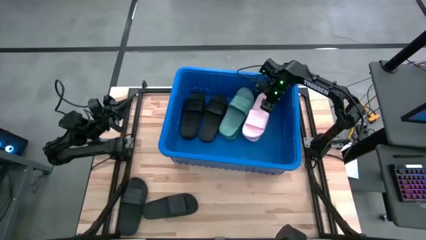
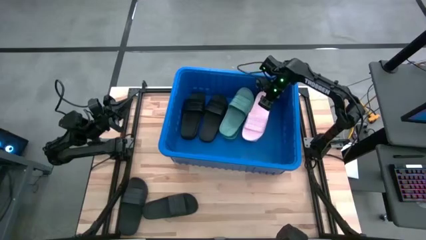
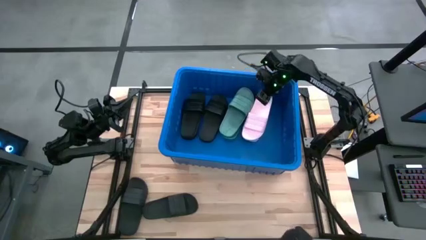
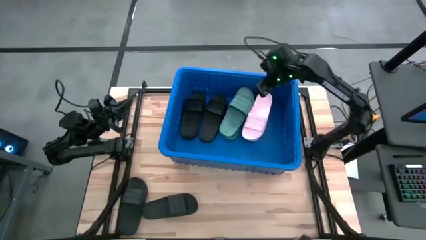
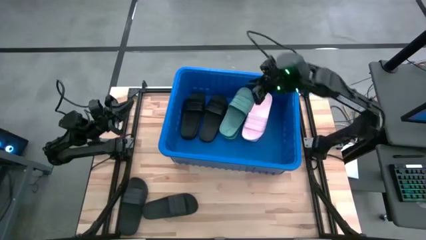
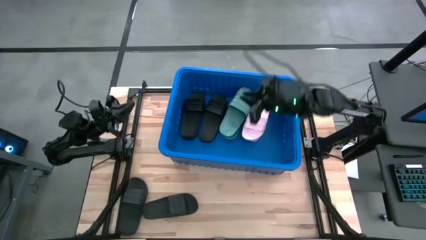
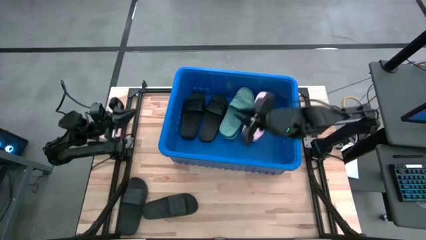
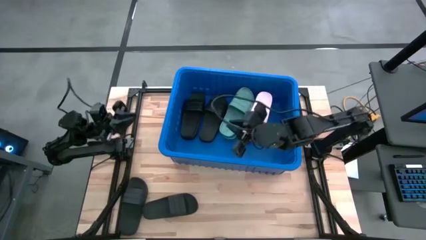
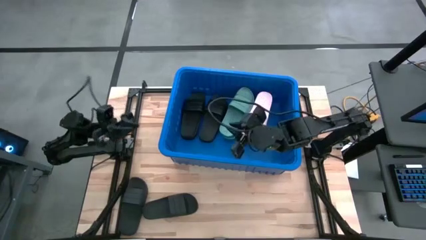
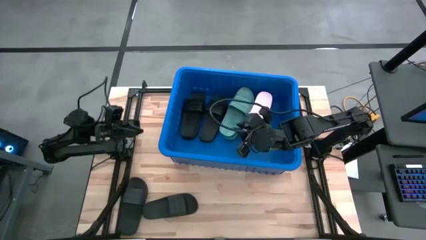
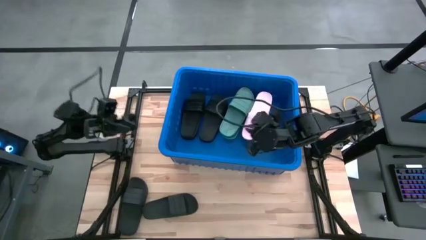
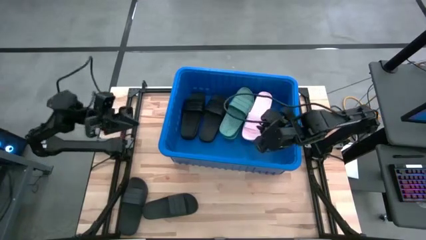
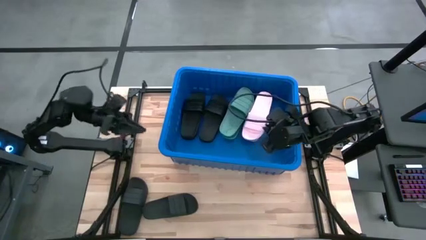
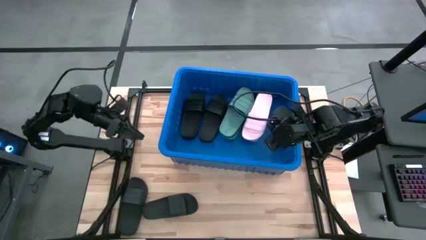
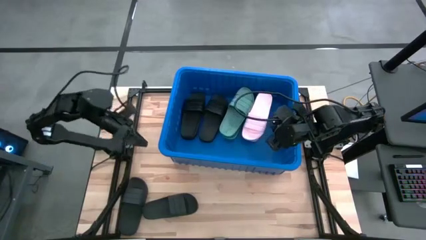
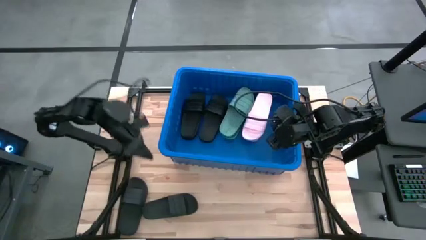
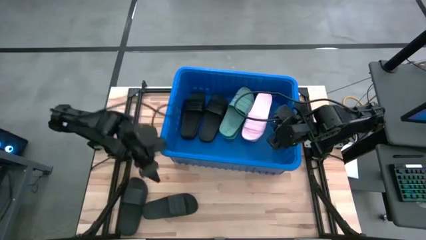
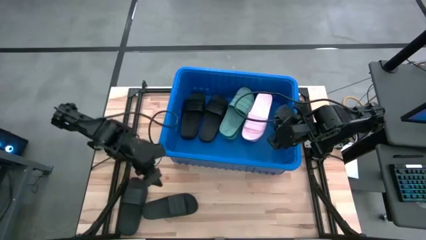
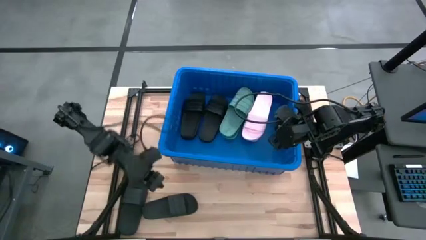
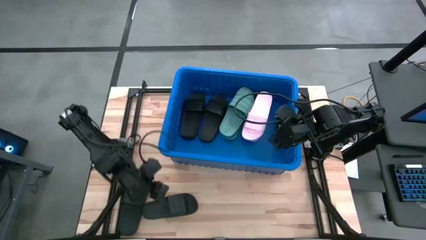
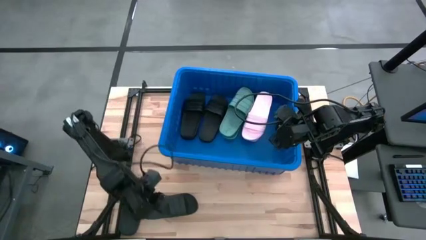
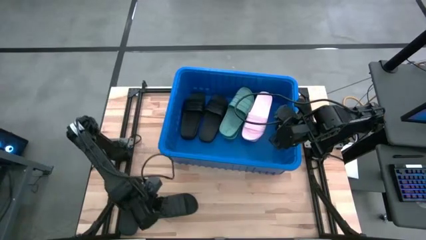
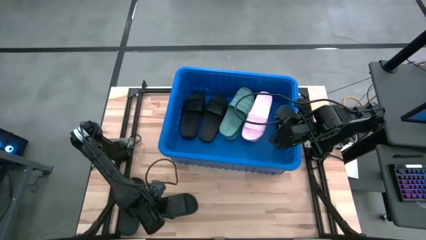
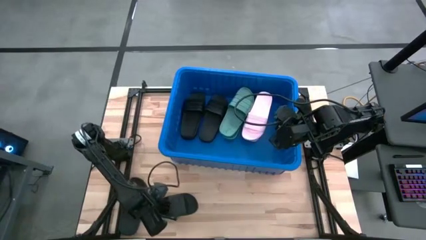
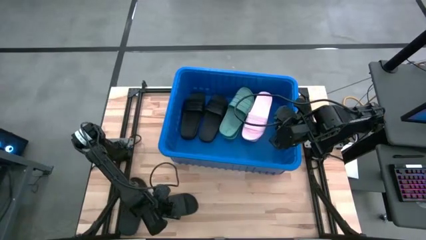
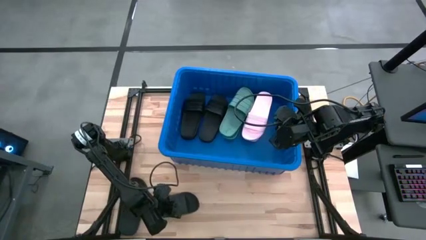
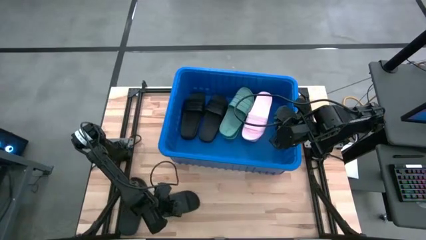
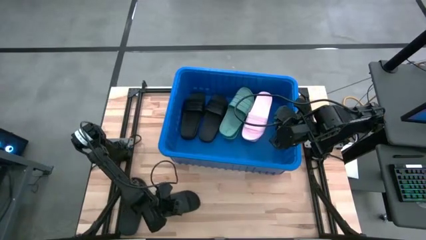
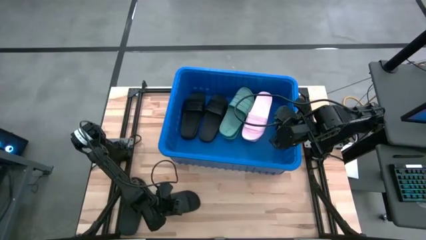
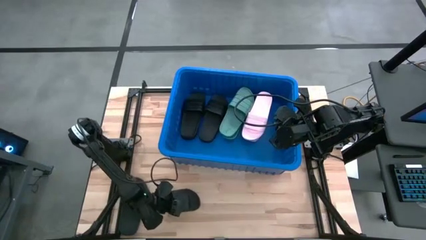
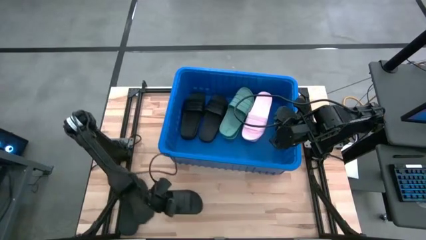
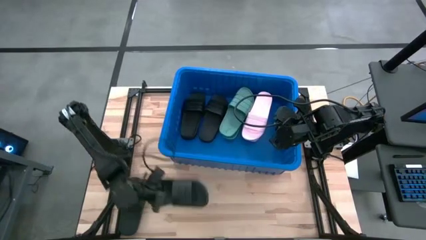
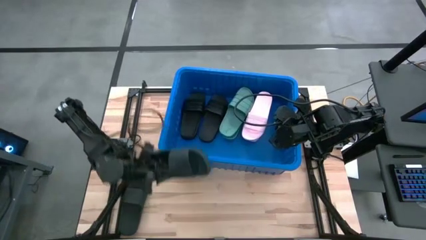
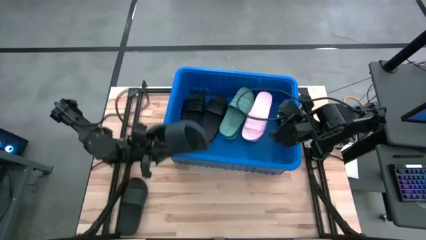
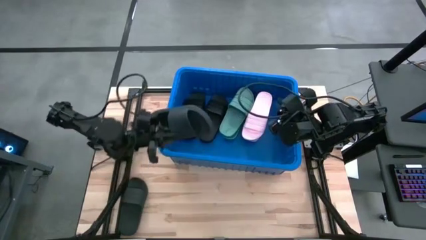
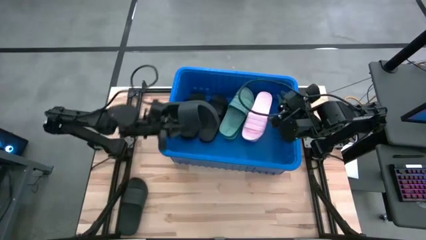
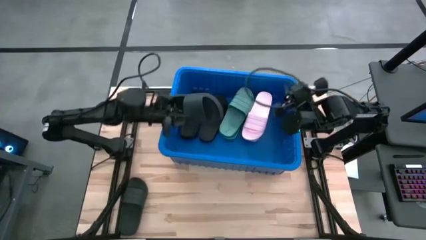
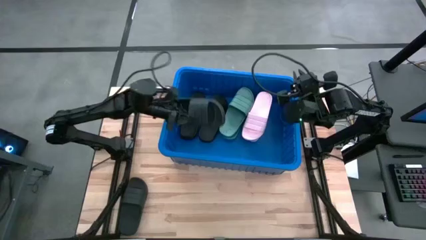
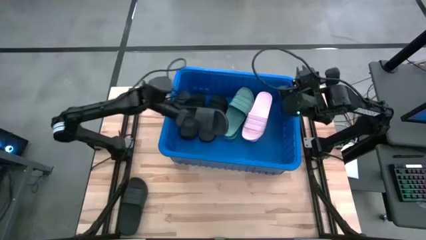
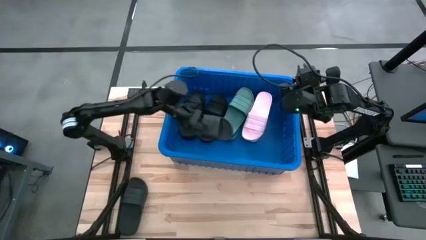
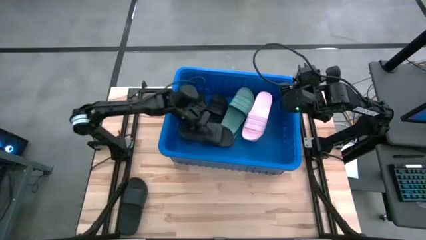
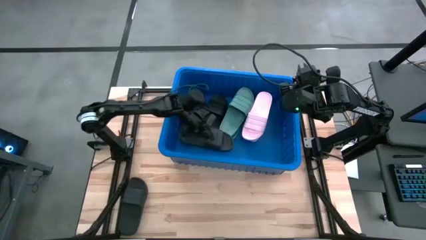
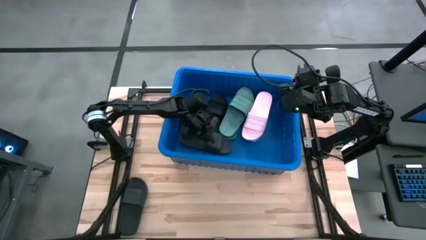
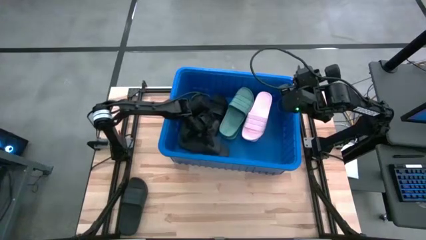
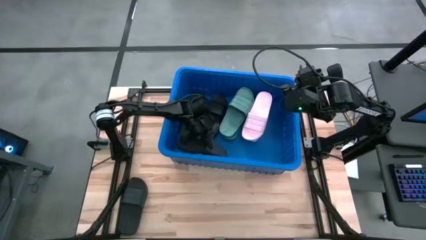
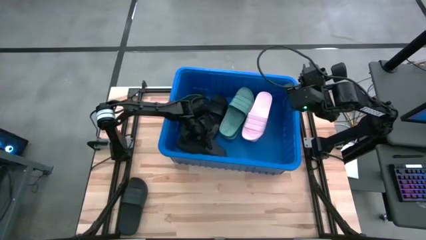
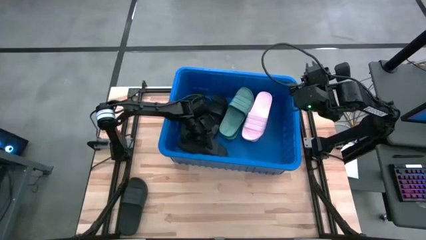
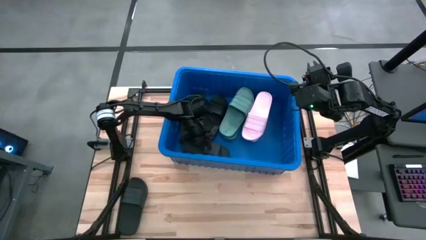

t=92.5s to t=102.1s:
Task: Pick and place slides into bin
Put the right black slide into the blue bin

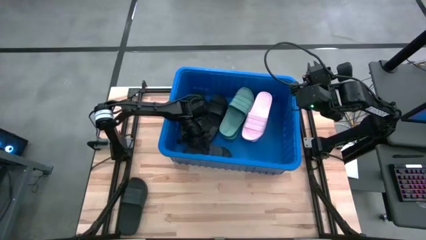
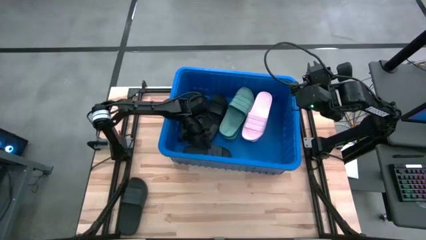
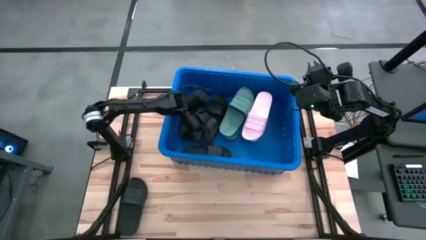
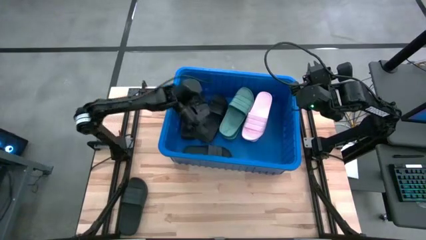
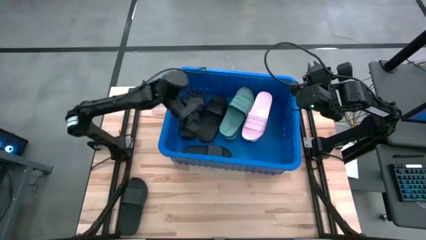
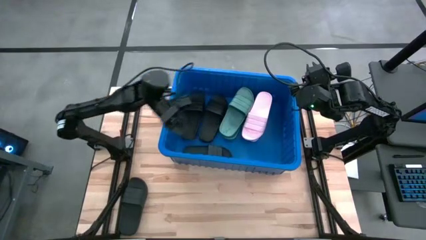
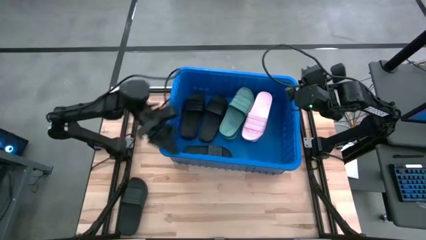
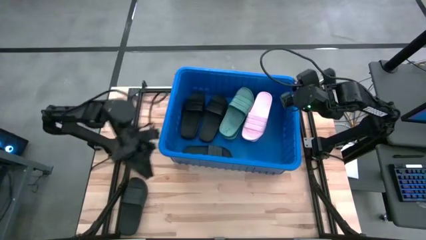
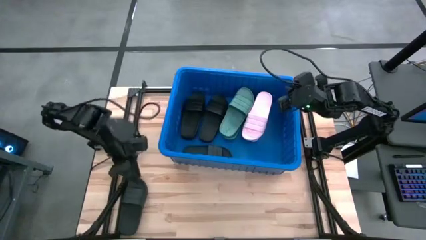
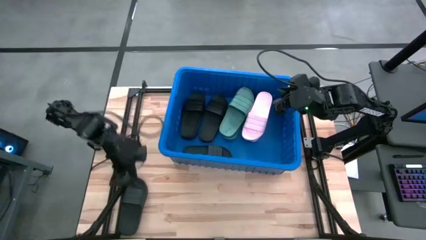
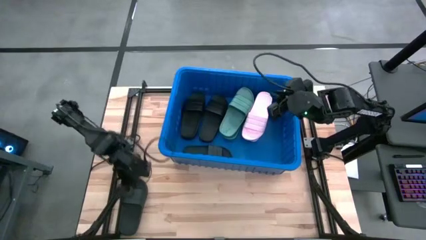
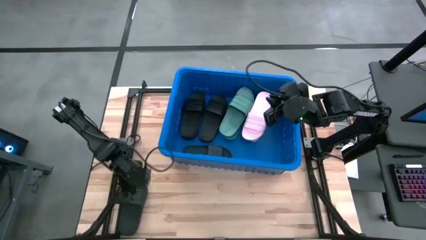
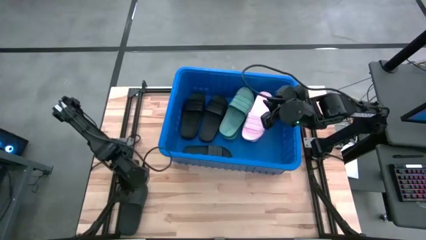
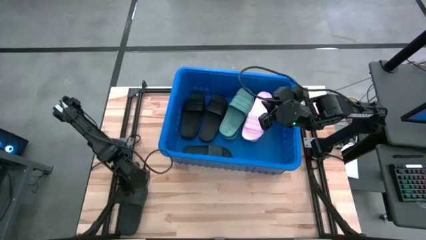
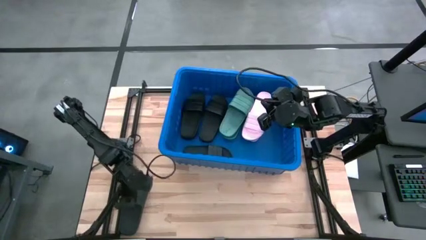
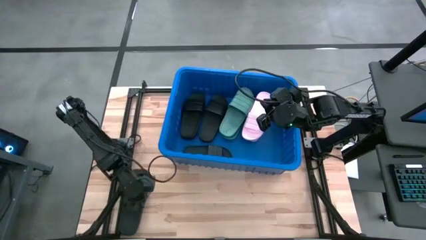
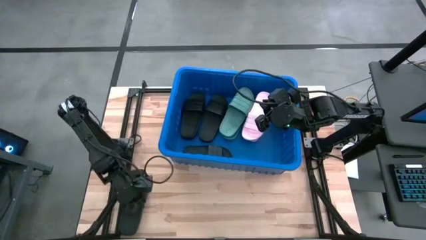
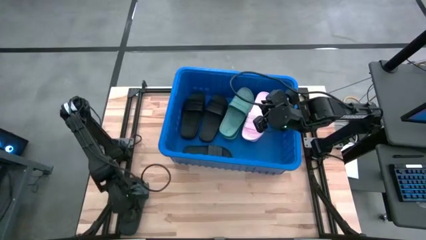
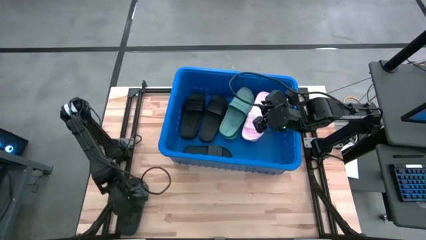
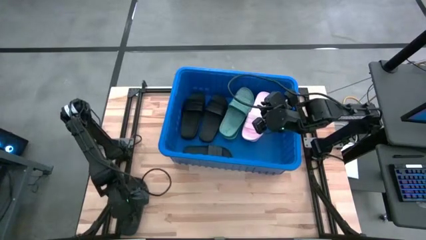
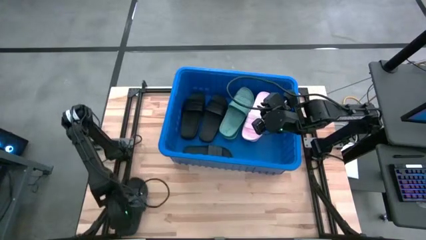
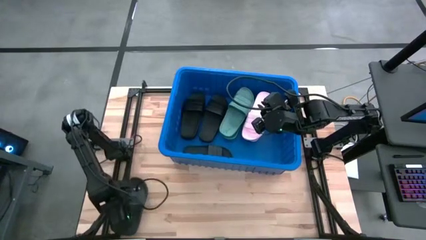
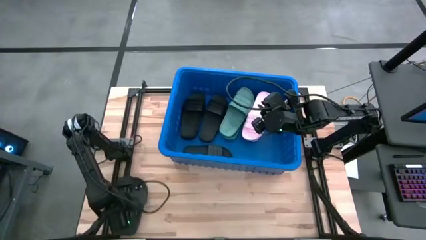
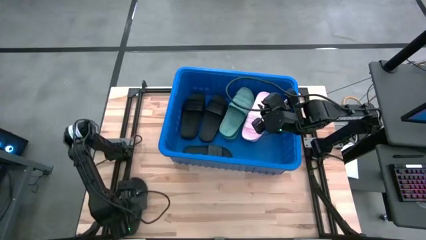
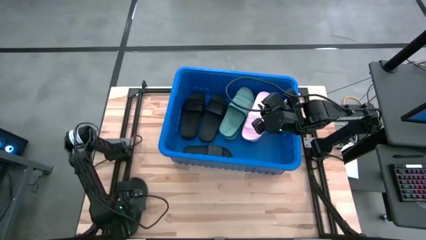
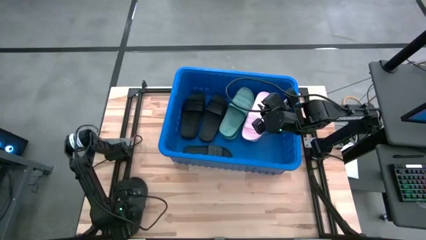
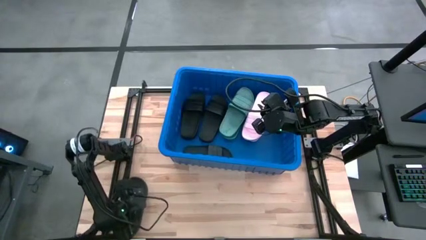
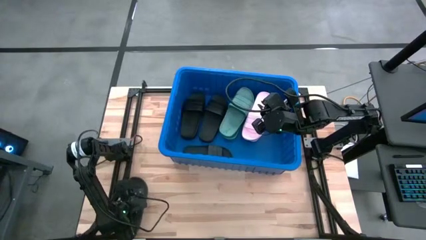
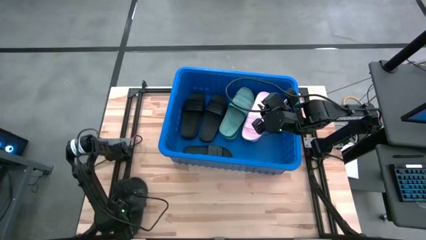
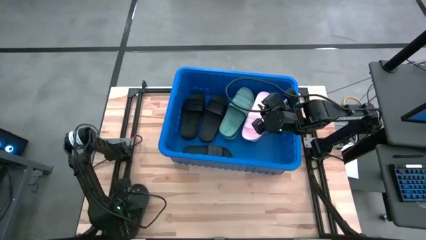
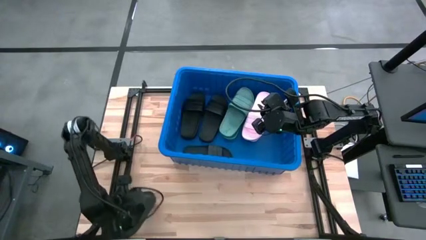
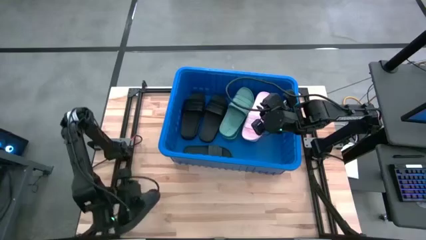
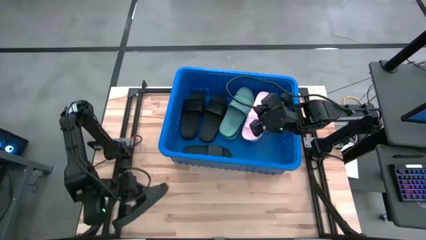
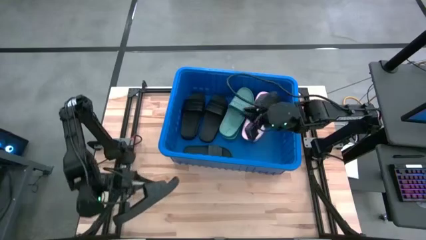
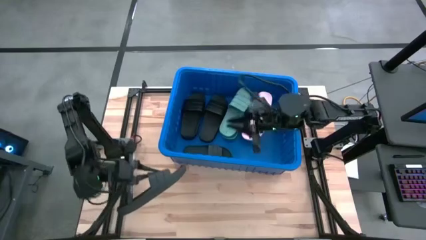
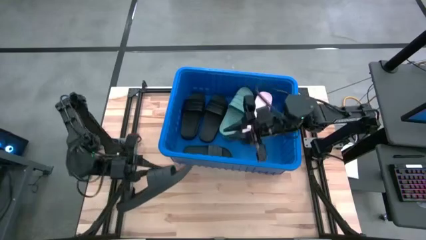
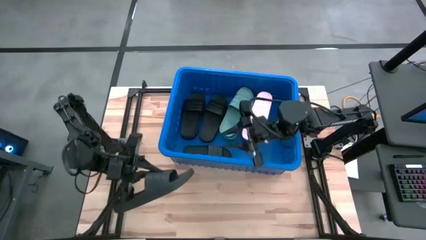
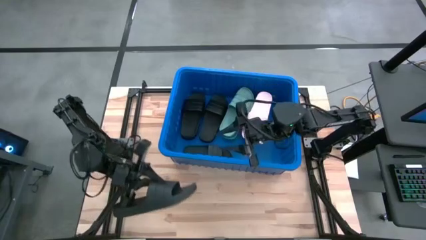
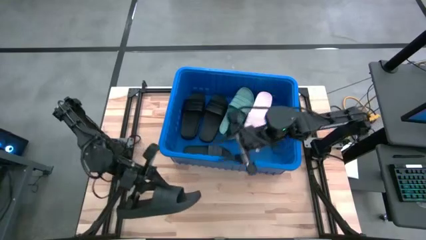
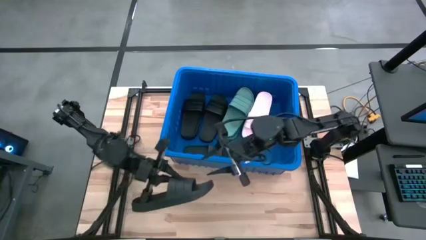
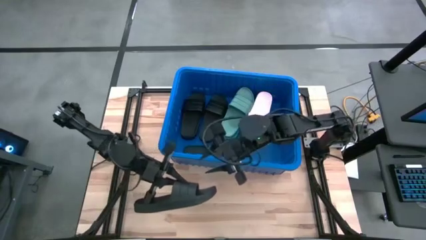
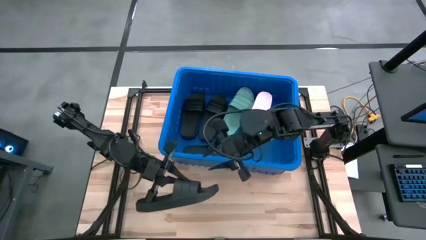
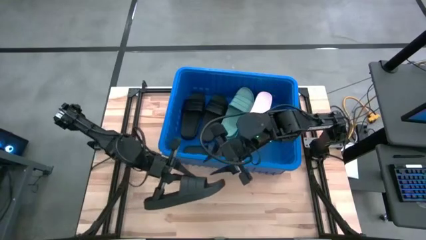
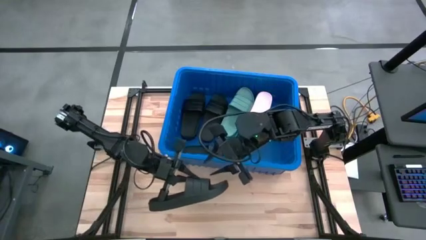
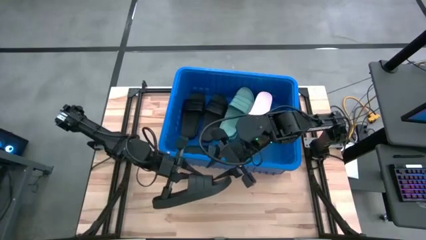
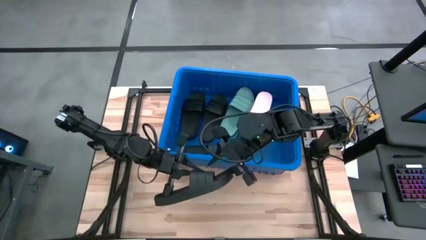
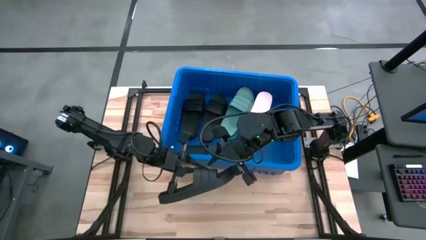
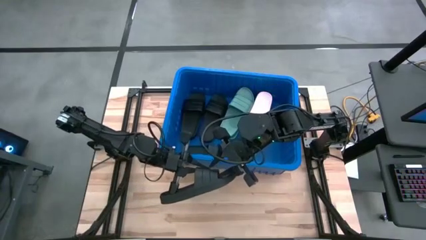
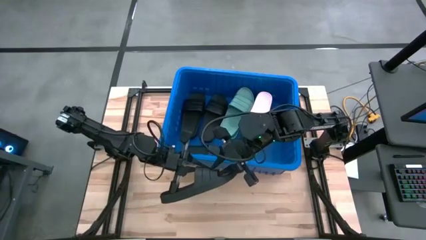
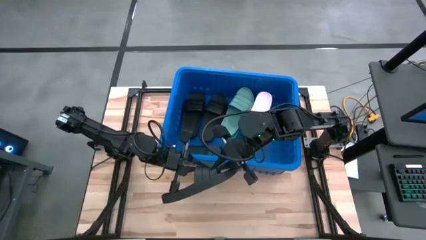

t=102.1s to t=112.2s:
Put the black slide into the blue bin
